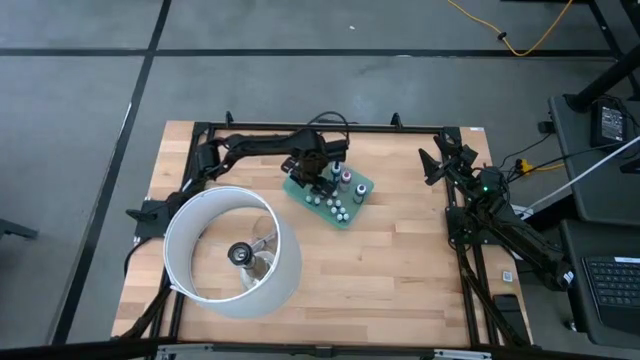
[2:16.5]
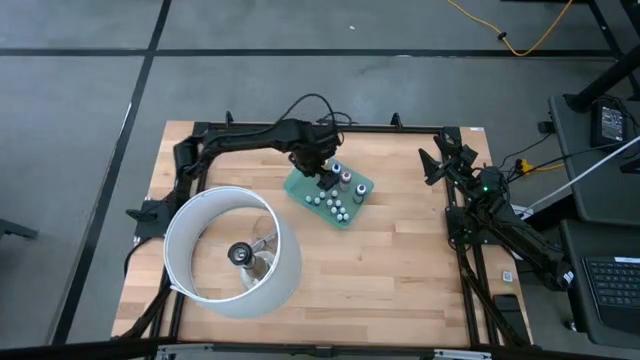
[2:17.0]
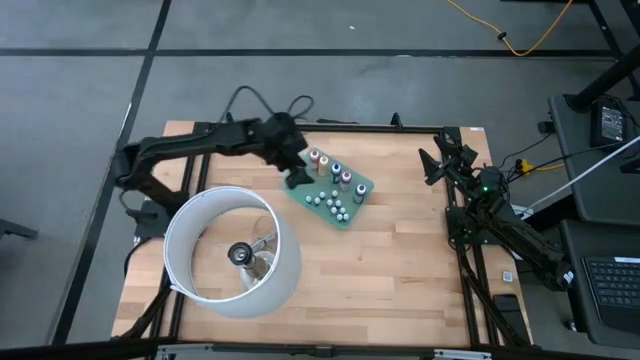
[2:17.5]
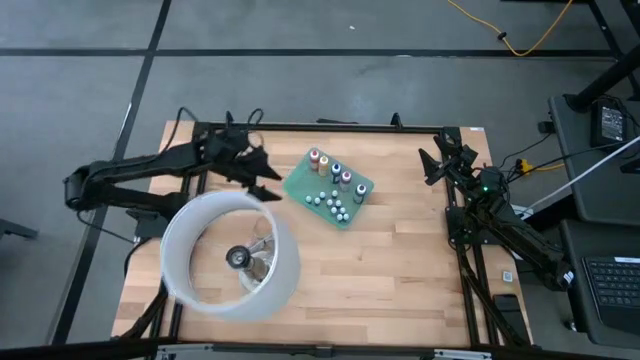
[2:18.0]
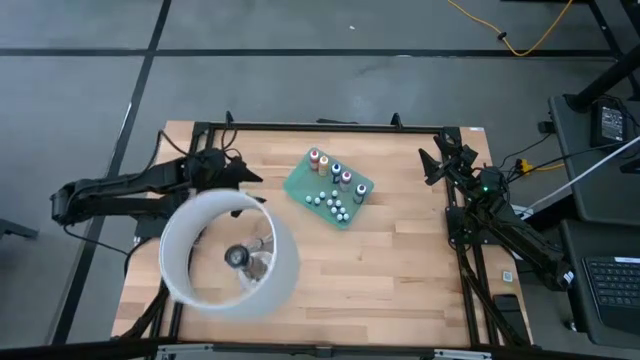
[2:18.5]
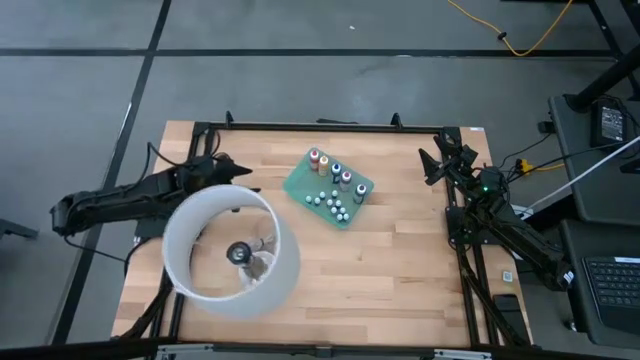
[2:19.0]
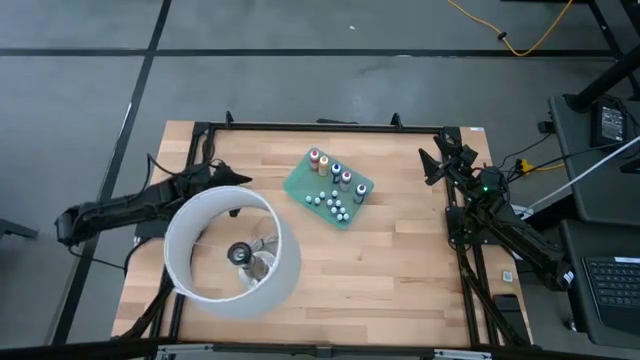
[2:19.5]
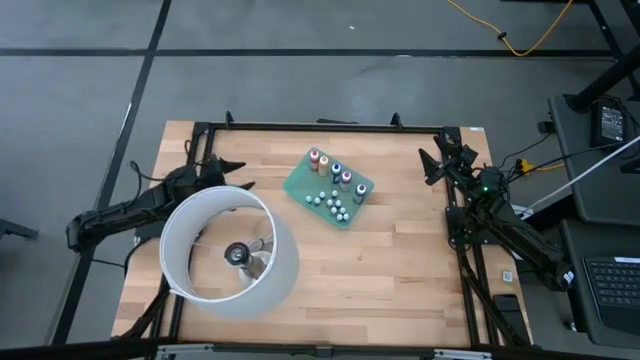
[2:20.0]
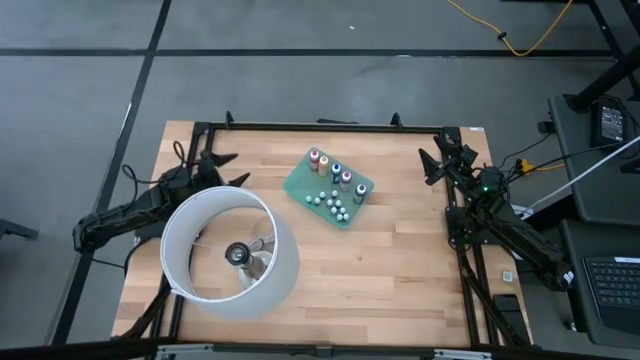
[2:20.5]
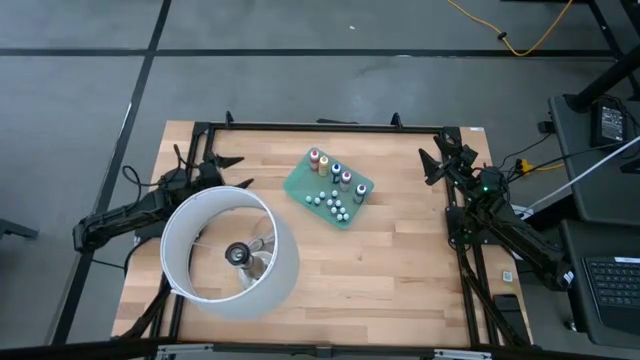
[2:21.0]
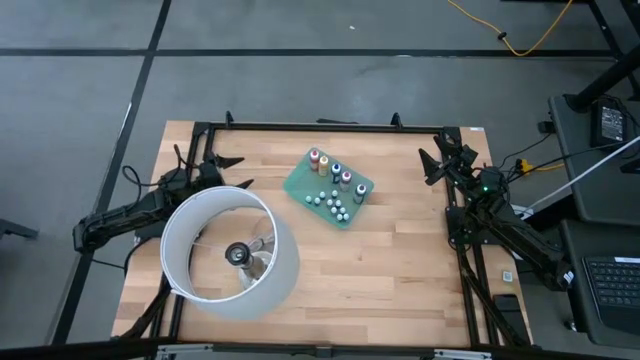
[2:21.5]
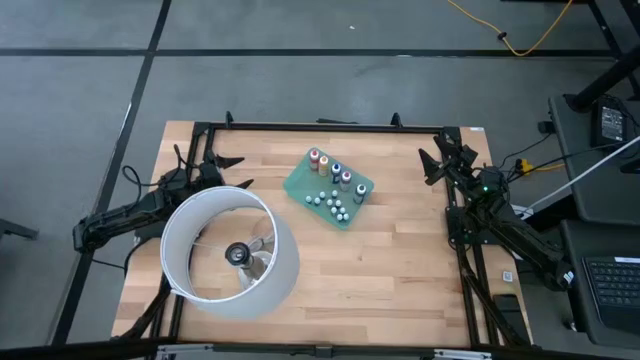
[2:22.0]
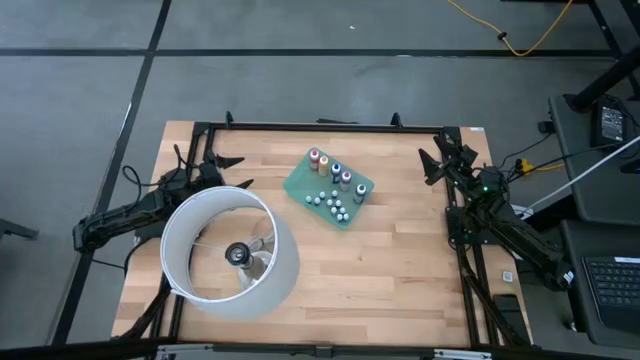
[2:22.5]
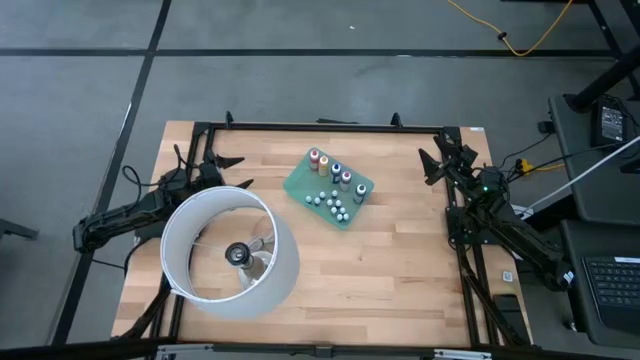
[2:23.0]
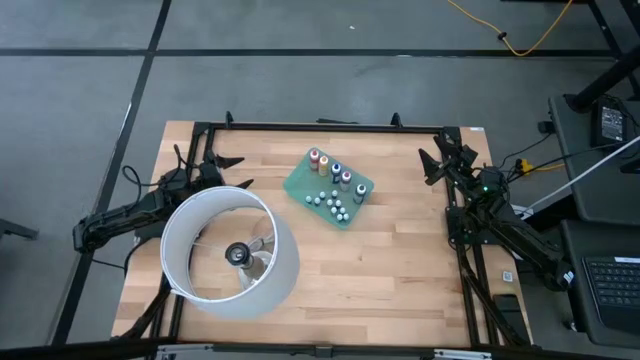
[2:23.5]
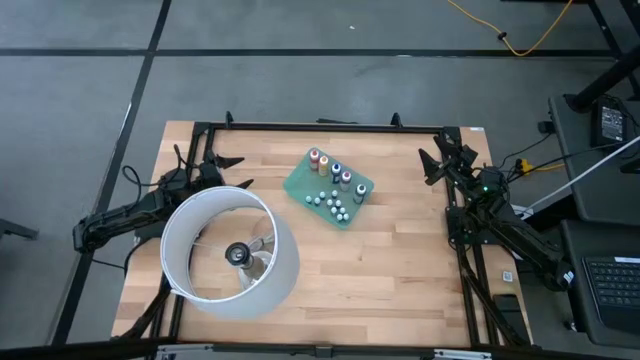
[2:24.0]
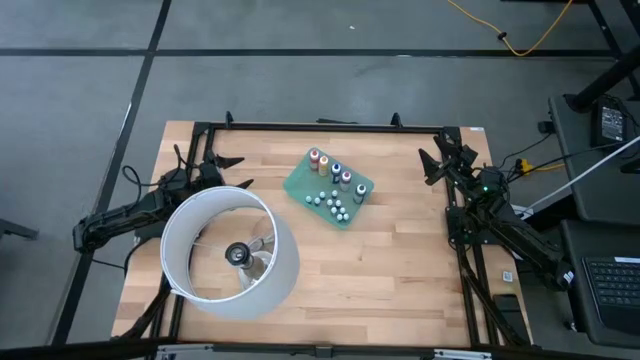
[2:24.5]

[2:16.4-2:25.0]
Task: Pick & Place food coloring
Return to Home Position

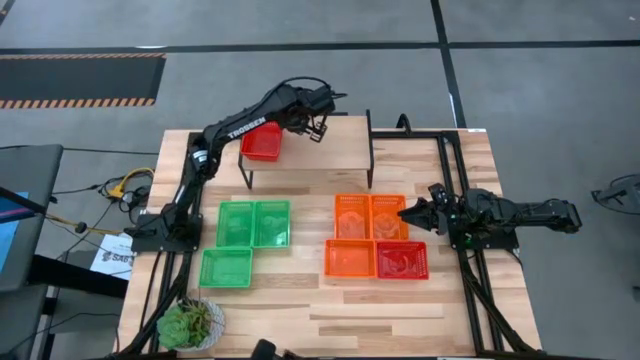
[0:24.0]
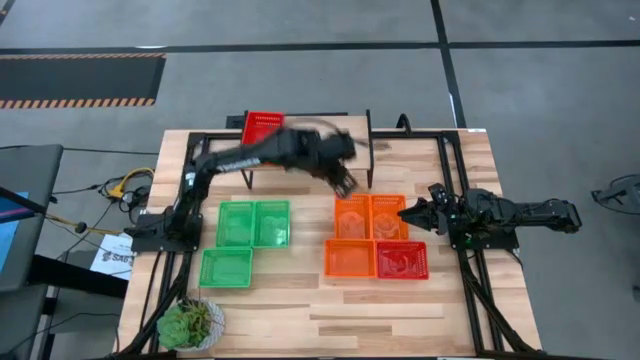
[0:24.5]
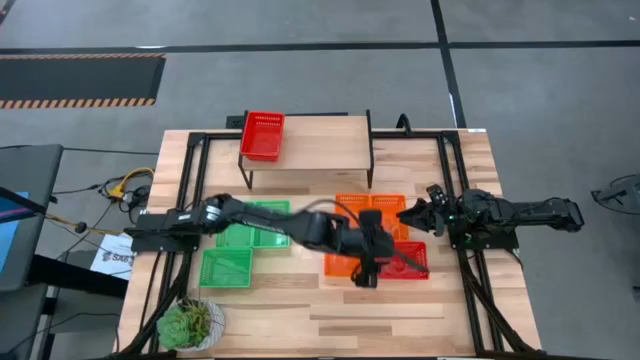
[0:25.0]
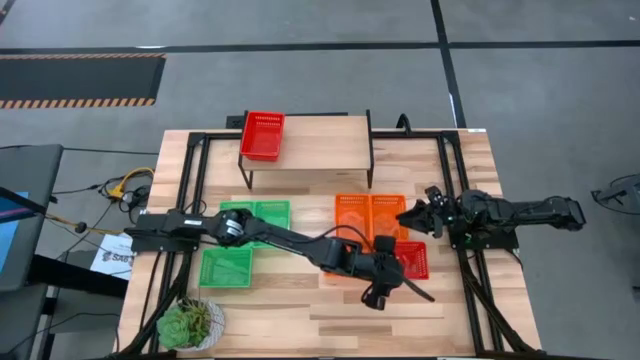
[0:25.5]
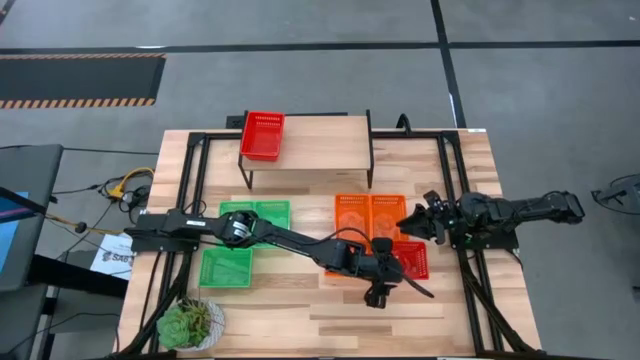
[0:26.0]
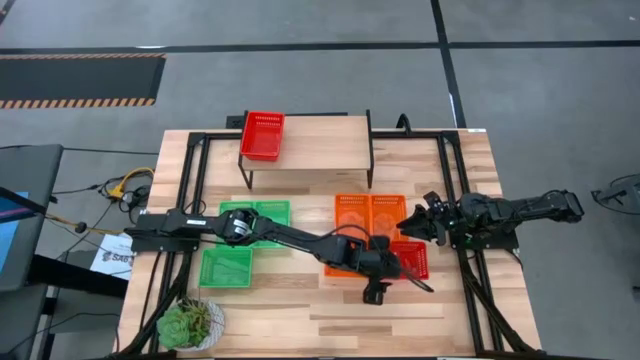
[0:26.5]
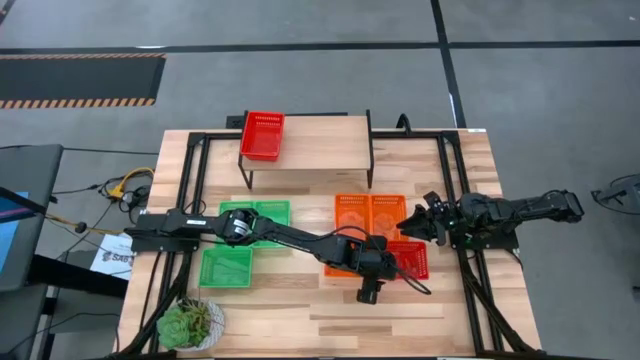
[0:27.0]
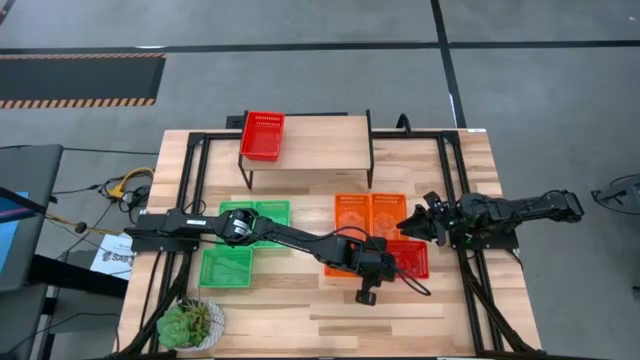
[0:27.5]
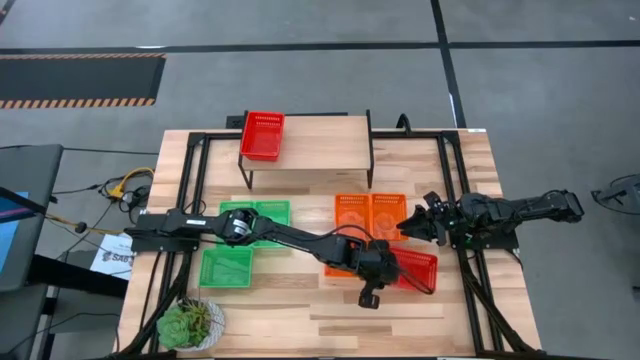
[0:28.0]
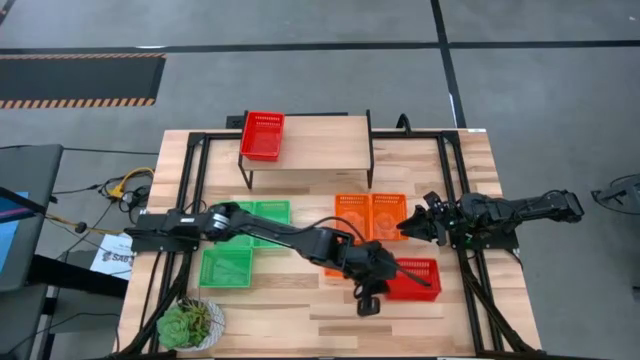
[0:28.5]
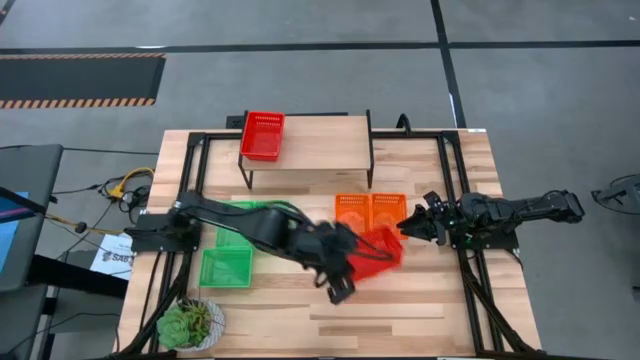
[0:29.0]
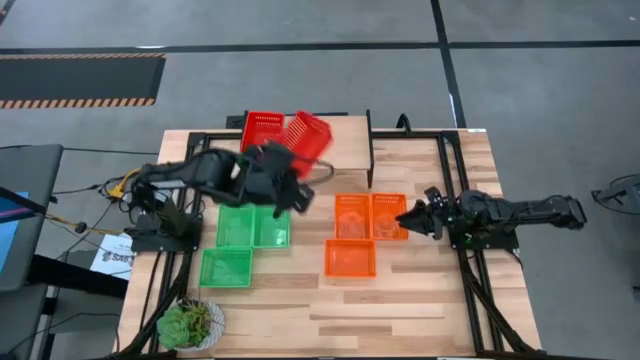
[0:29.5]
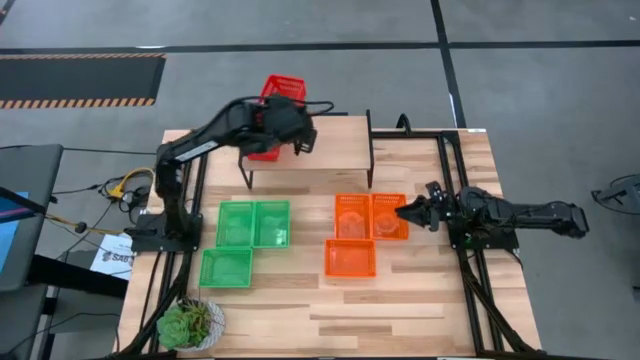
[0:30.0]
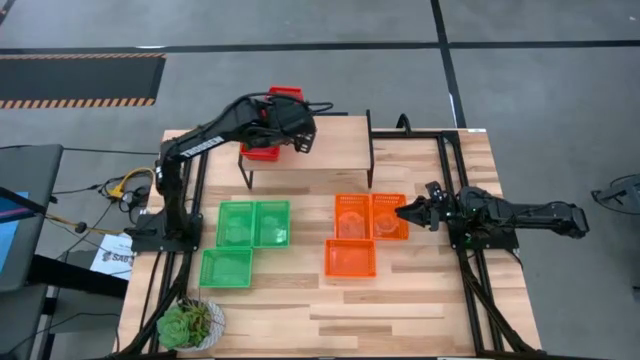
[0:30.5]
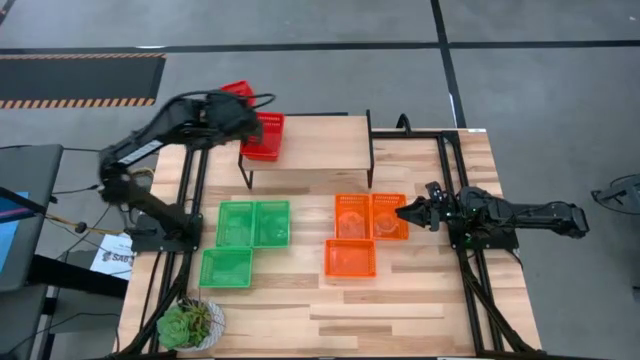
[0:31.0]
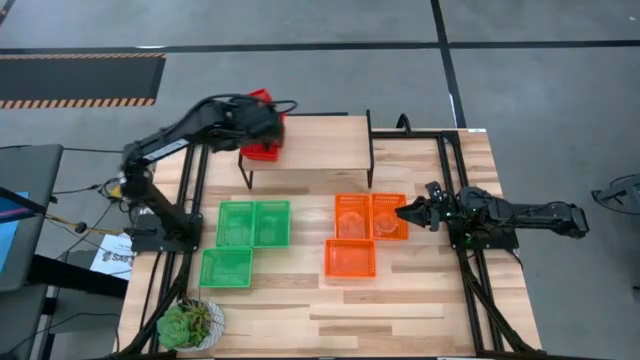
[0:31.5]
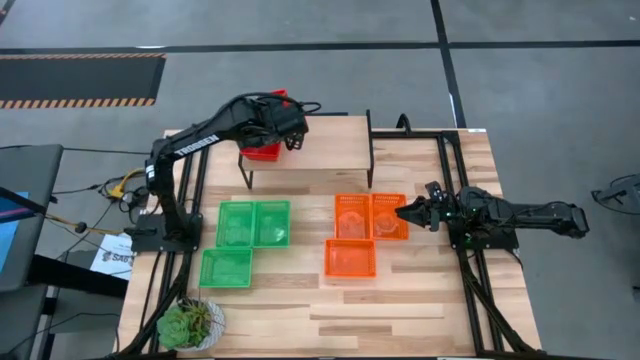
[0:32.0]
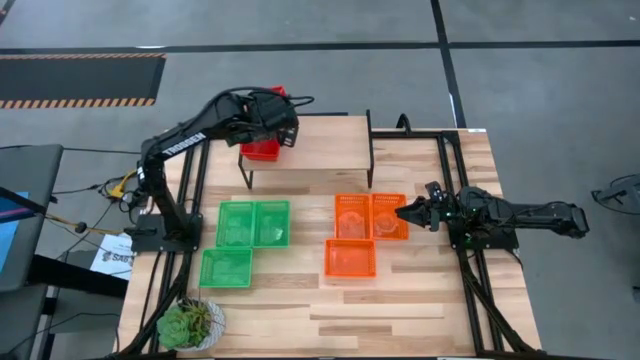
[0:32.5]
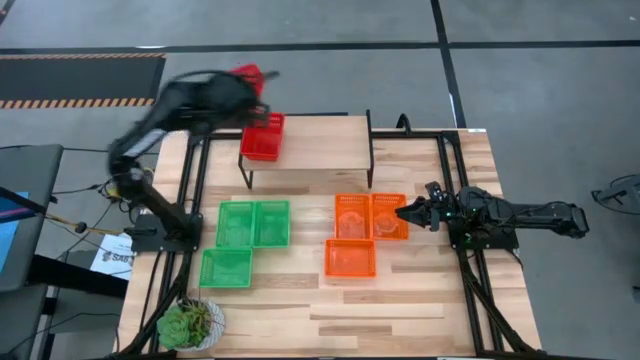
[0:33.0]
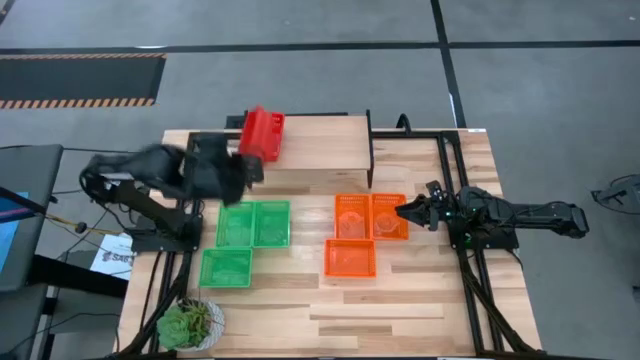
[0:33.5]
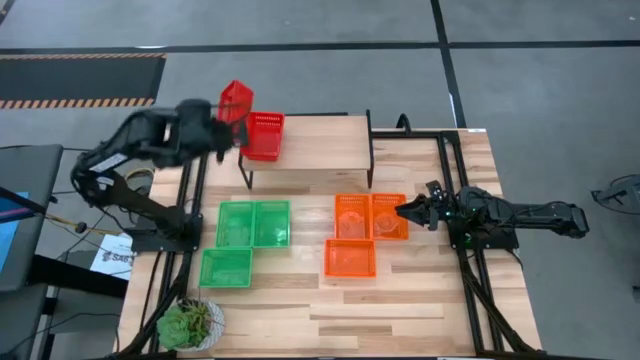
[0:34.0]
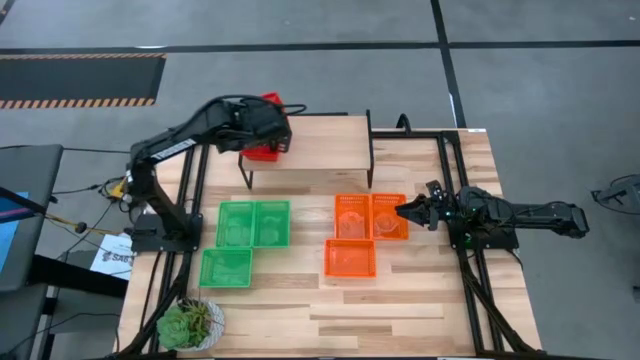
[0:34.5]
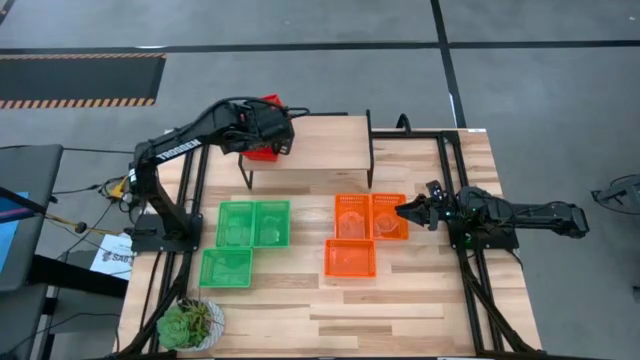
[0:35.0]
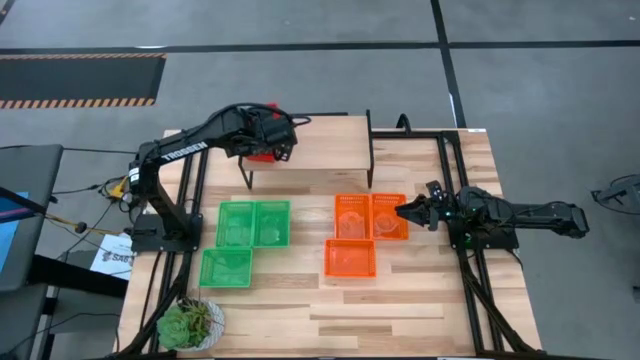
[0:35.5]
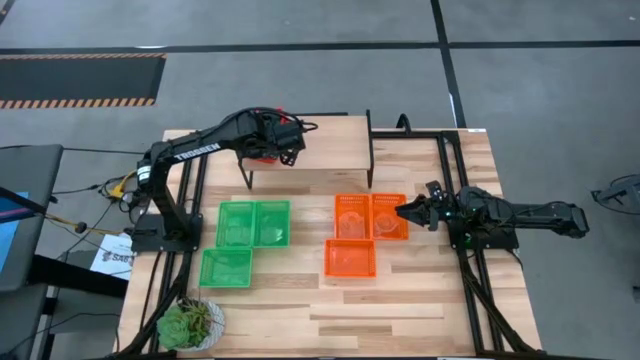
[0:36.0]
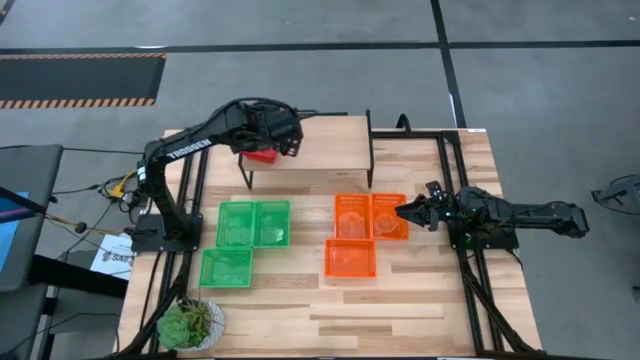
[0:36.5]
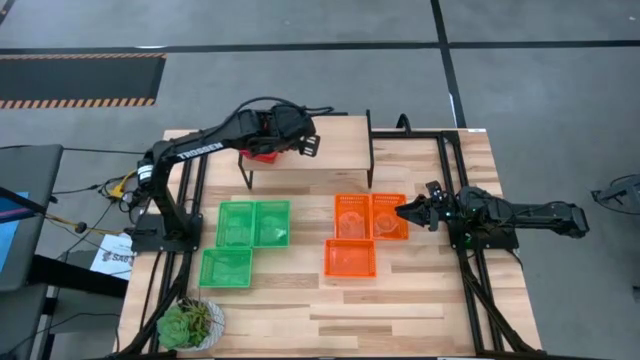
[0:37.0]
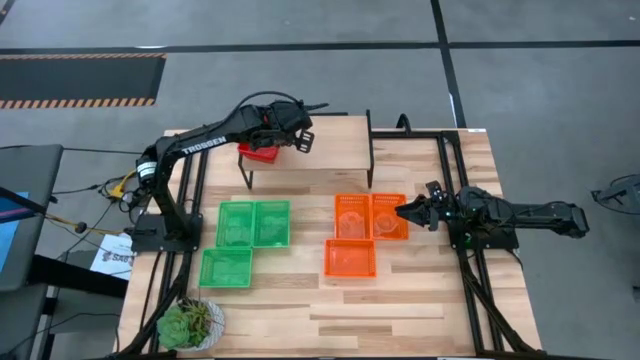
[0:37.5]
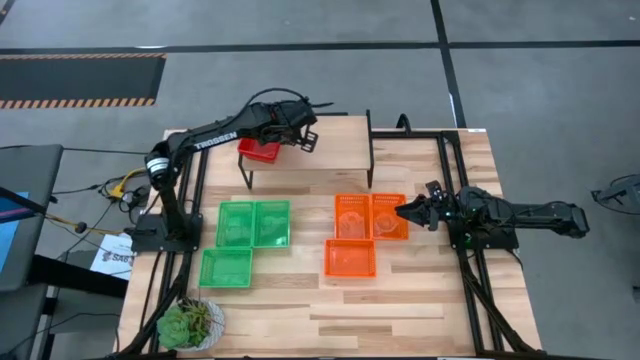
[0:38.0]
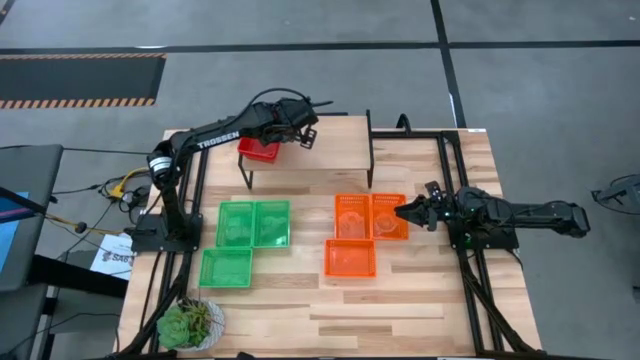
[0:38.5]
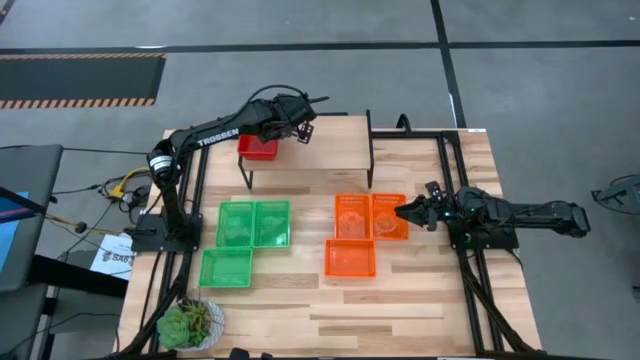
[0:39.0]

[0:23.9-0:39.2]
Task: Stack baskets on shelf by color
Stack the red bin on top of the red bin on the shelf
